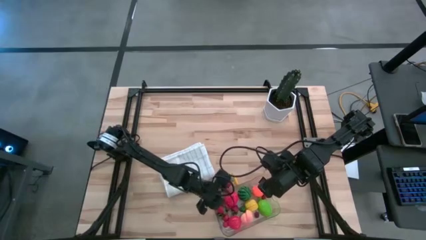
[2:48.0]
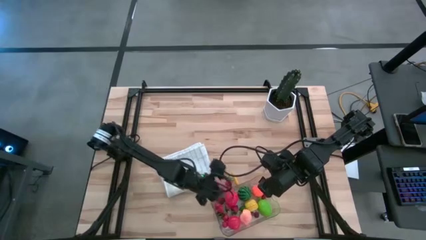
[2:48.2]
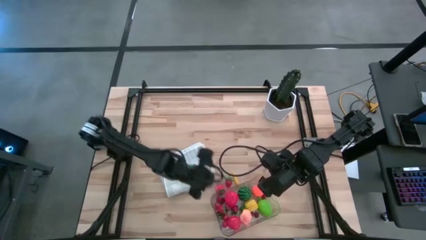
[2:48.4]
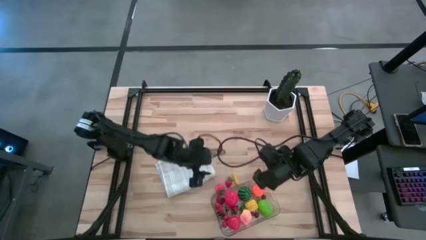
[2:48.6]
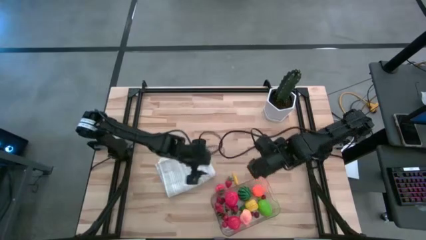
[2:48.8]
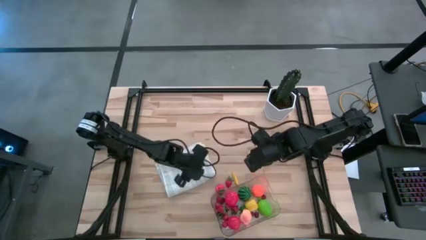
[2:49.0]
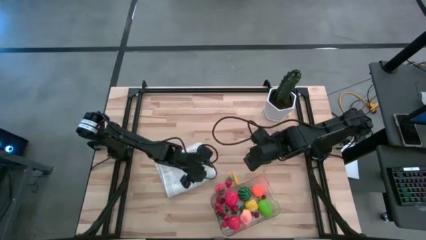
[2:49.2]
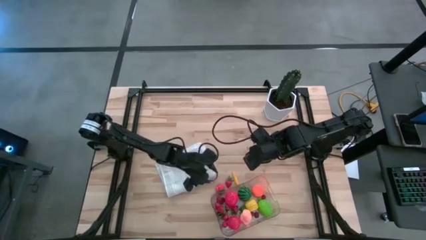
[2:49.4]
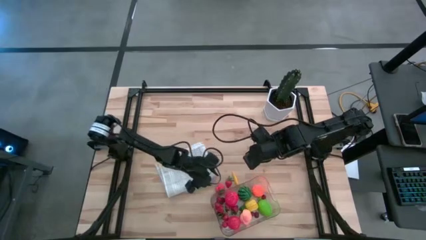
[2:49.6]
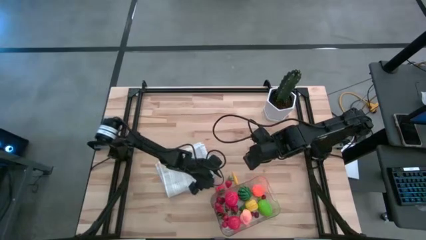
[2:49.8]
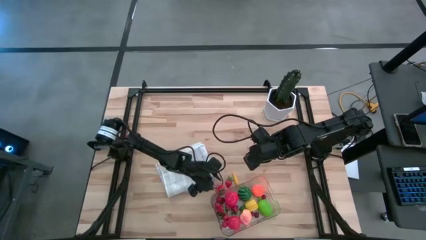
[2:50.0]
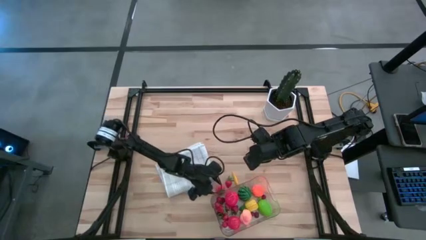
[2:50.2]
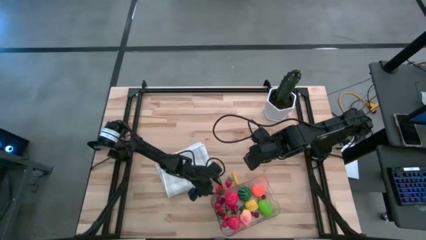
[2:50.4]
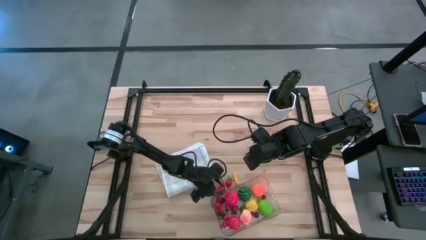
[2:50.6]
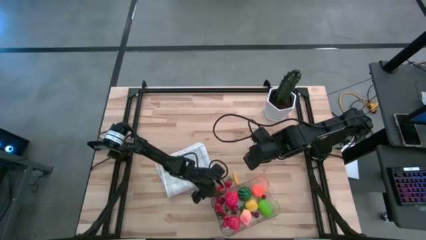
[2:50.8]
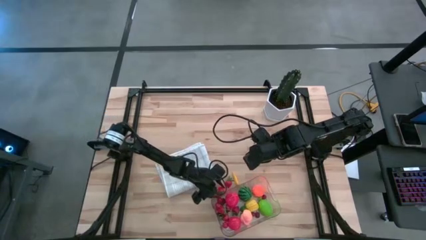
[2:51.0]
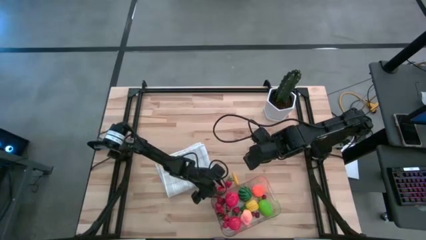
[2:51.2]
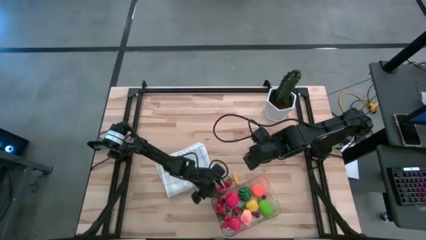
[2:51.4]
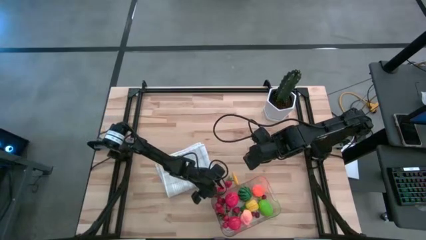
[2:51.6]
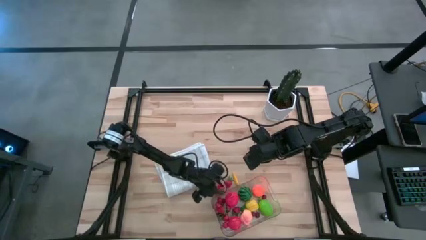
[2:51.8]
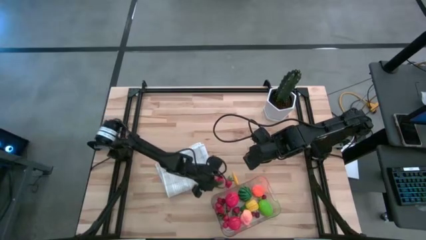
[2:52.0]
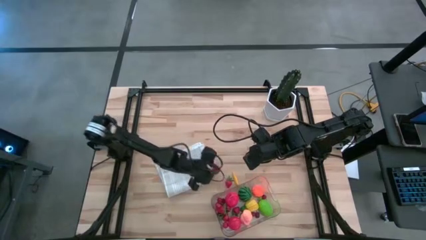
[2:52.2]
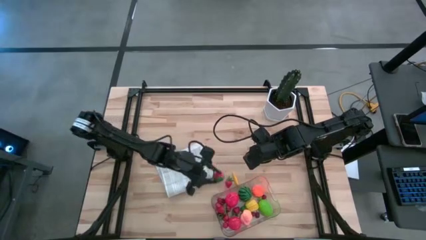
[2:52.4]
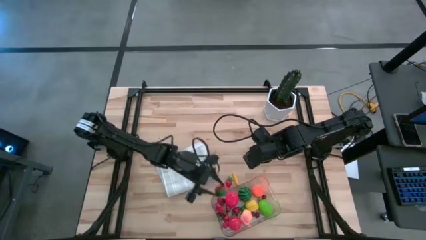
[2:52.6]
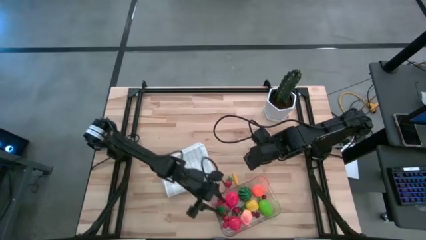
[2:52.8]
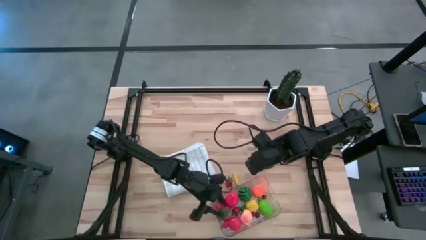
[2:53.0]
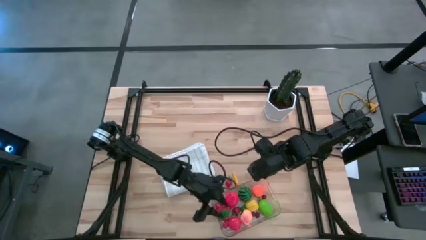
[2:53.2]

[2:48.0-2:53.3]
Task: Pick and placing Produce into tupperware
Put the strawberry into the transparent bin

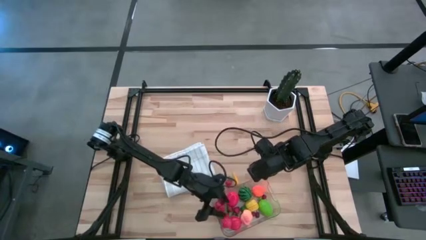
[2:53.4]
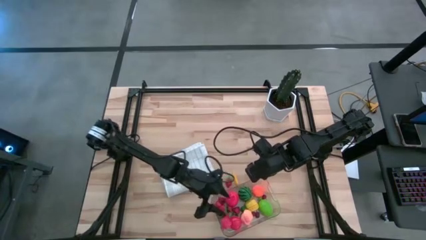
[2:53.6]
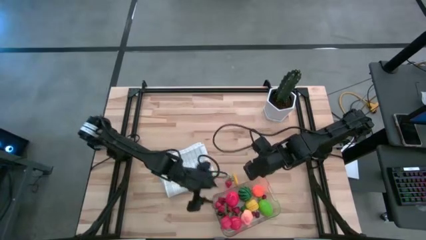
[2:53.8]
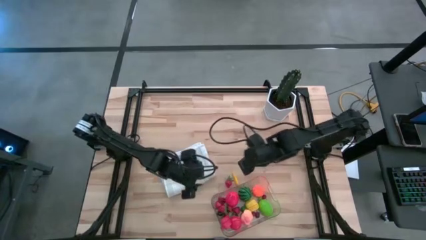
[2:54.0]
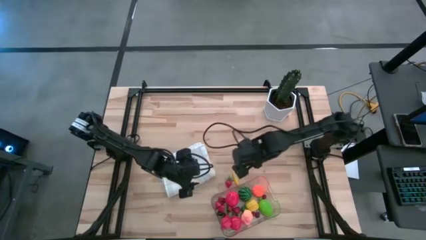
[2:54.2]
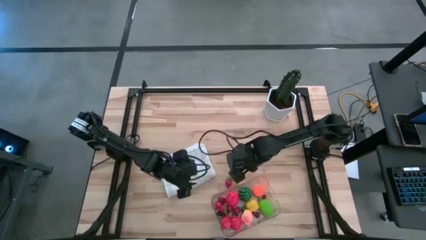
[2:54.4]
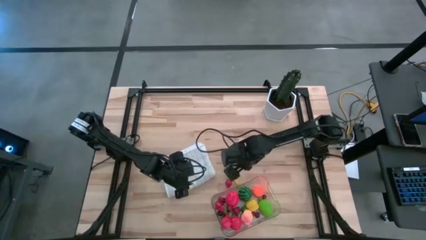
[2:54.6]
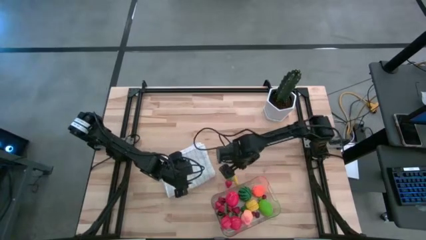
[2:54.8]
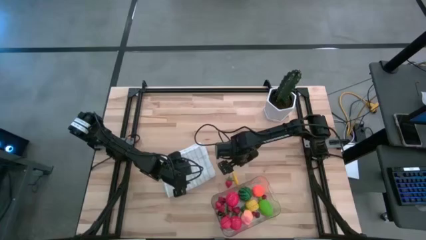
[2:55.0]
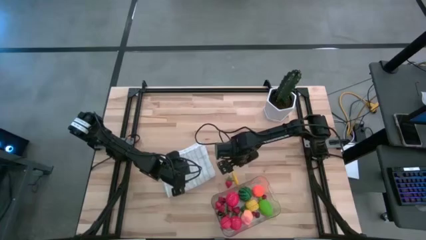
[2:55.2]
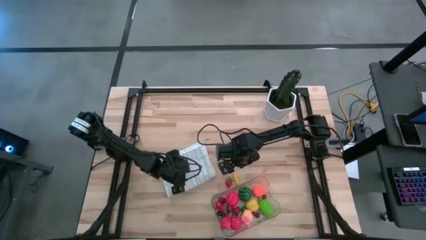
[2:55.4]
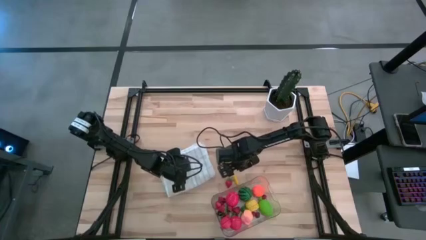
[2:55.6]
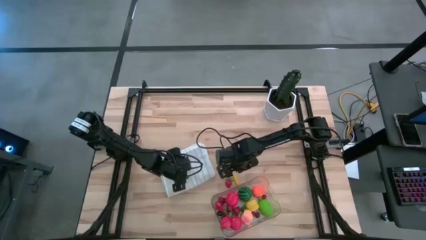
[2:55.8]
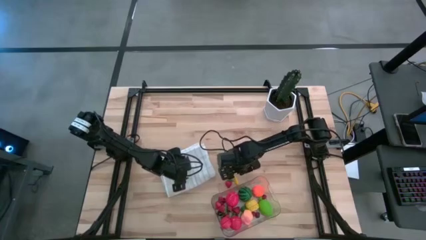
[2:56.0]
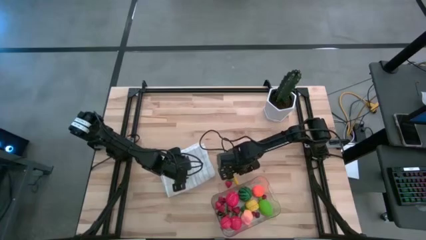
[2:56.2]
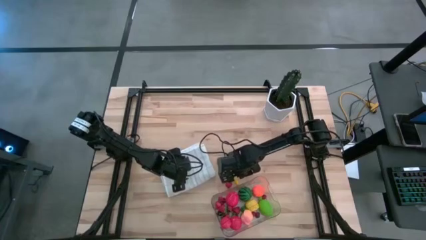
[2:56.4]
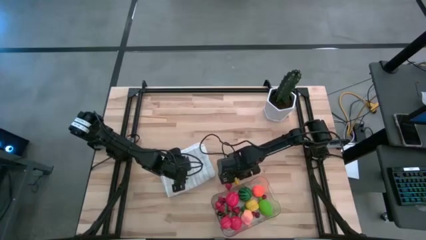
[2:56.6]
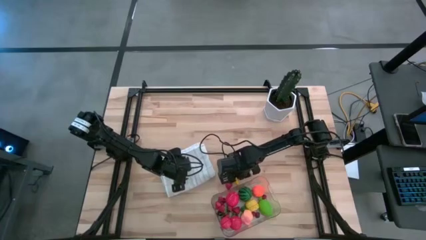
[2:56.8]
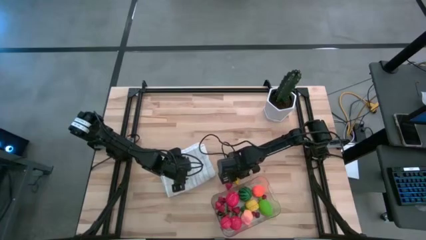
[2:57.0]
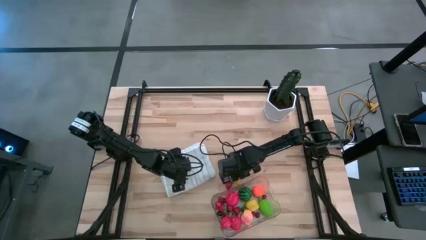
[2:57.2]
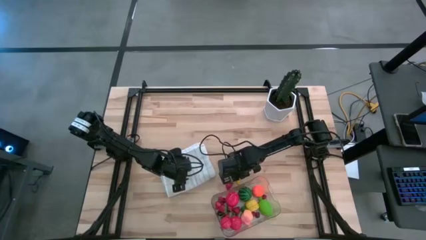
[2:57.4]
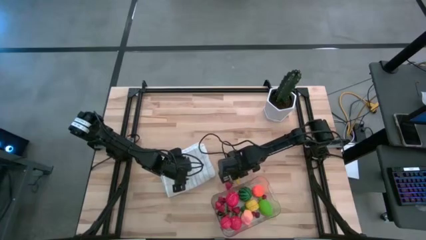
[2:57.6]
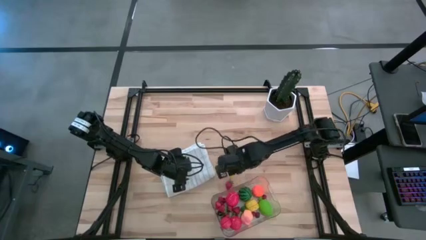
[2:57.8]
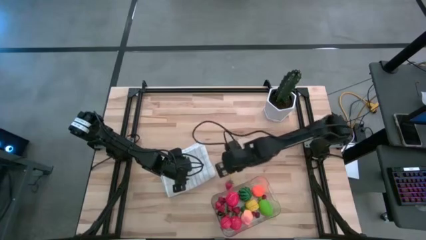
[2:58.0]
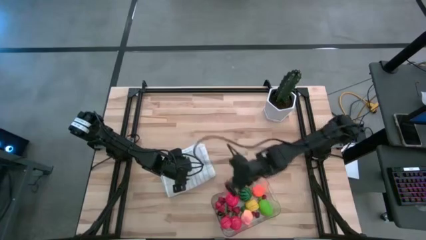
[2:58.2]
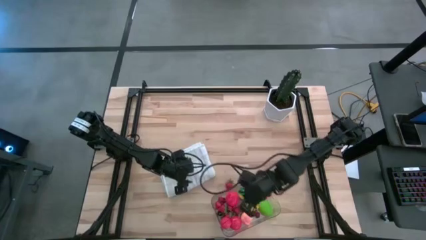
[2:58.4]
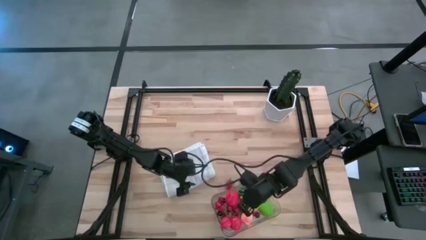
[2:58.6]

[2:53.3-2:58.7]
Put the corn into the transparent bin

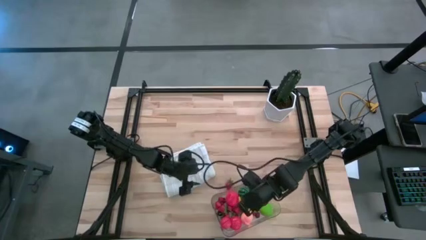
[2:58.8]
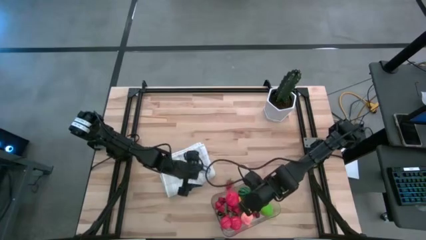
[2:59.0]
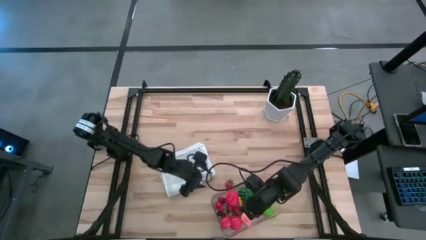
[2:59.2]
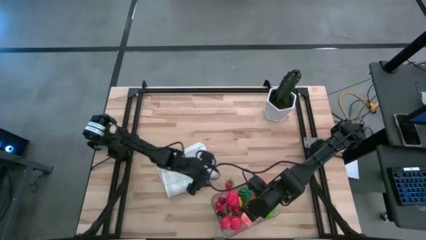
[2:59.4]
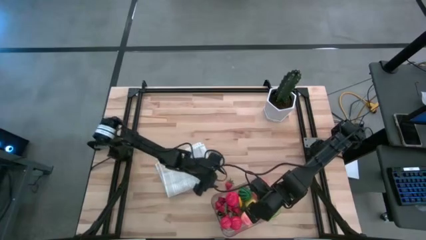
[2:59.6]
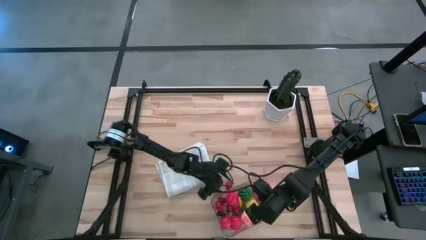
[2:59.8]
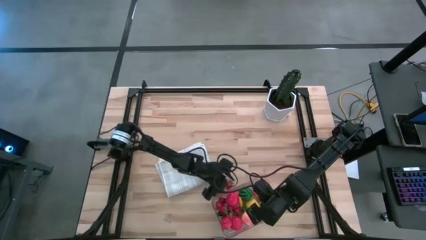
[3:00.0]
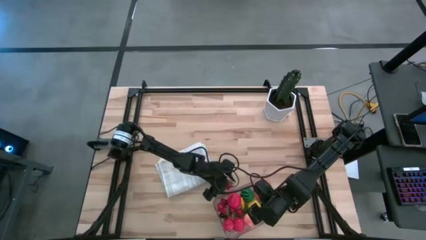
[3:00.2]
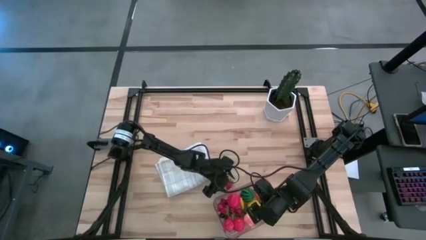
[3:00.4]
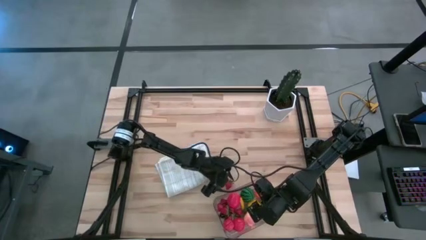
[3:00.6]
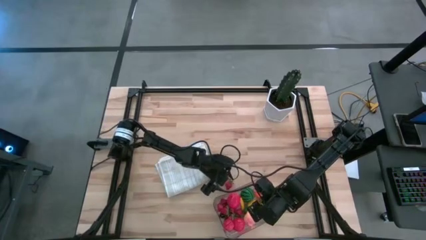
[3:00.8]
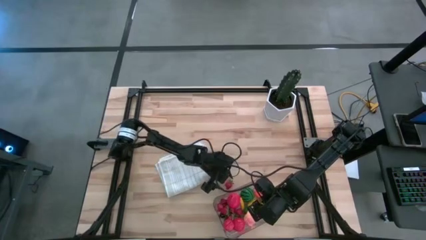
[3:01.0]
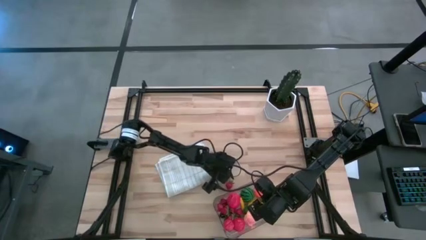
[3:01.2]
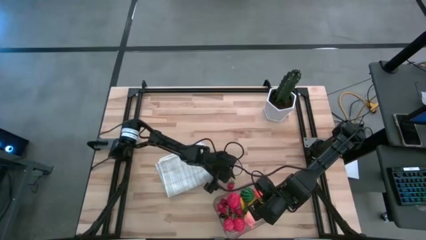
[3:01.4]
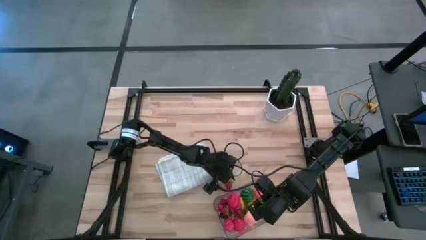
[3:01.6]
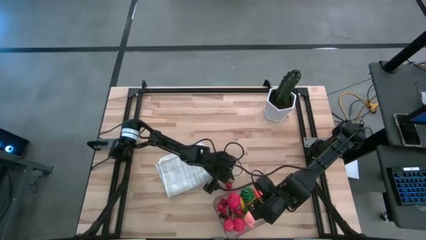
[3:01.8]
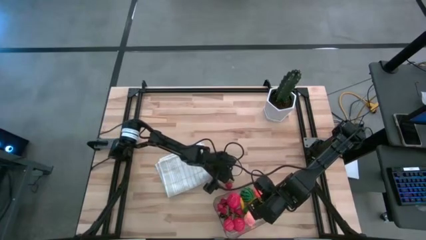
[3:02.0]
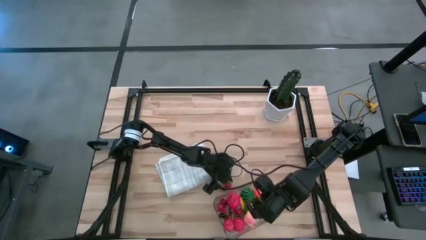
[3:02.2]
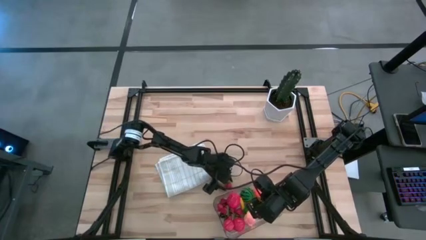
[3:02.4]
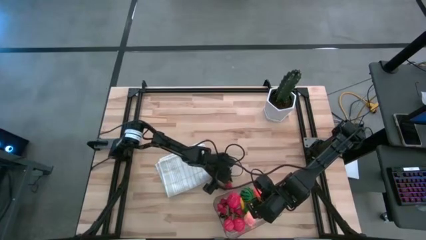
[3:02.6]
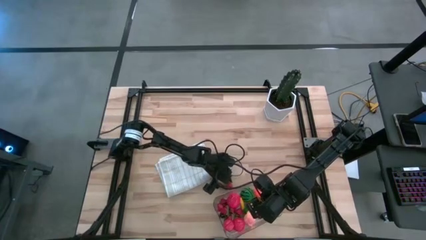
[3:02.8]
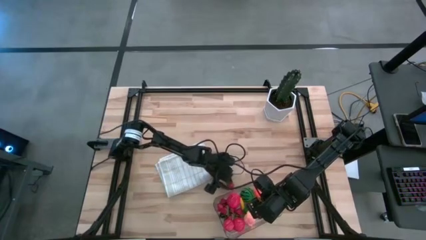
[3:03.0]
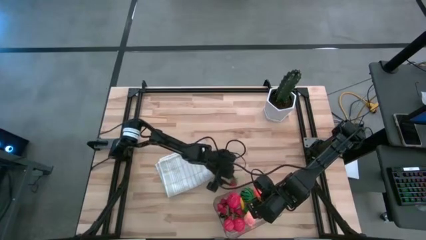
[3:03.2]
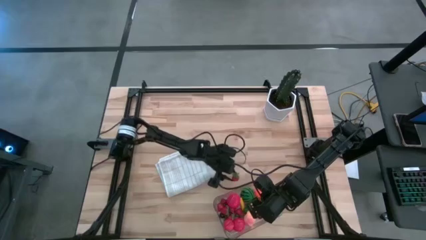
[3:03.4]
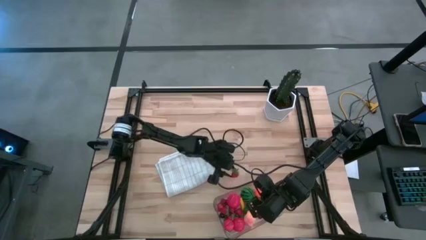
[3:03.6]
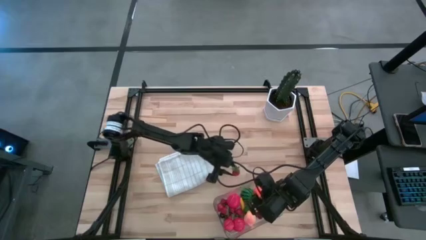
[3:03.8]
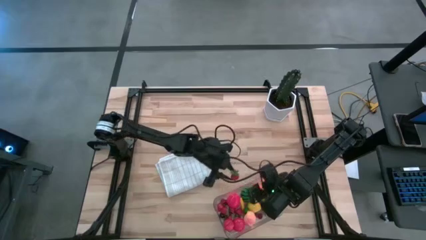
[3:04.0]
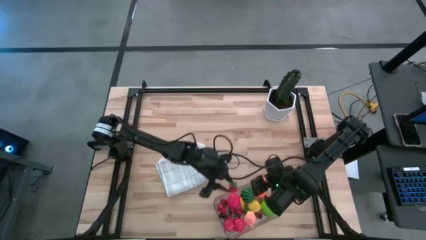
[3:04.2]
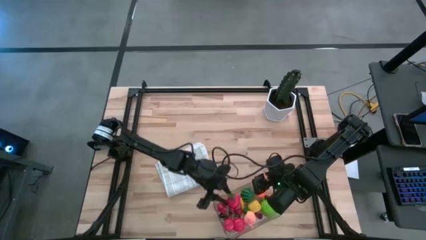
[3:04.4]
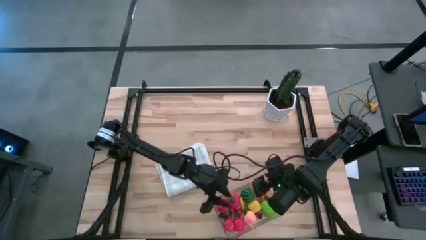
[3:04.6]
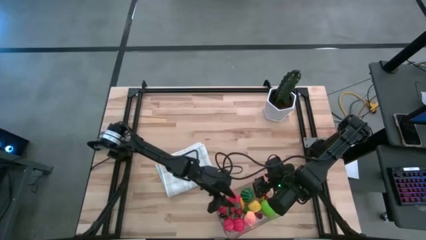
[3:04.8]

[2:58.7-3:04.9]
Put the strawberry into the transparent bin
